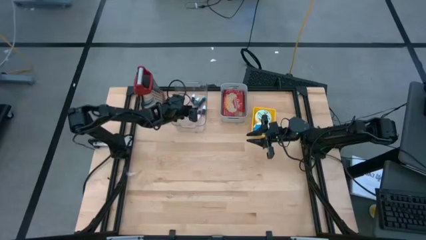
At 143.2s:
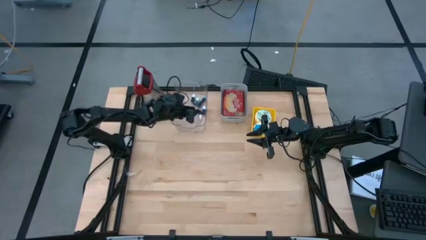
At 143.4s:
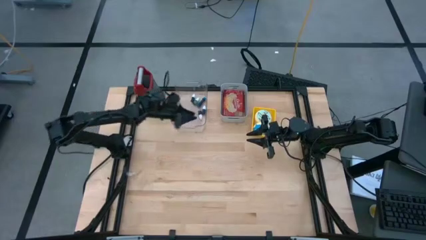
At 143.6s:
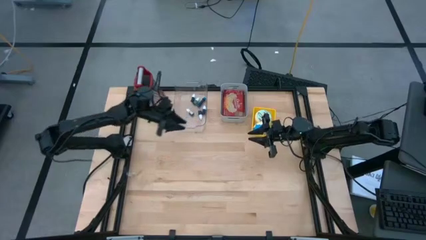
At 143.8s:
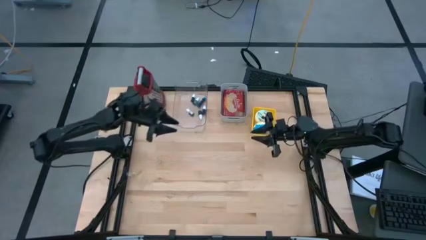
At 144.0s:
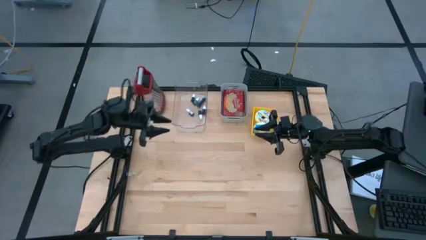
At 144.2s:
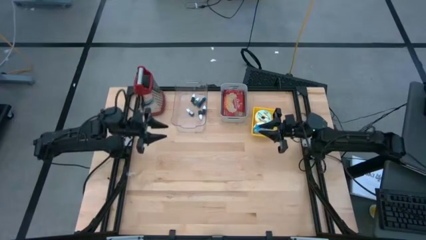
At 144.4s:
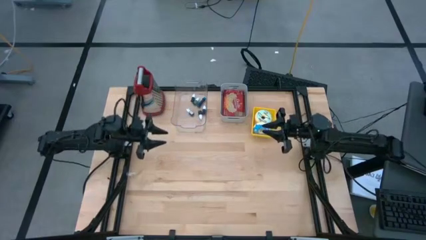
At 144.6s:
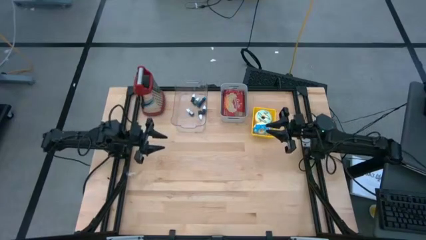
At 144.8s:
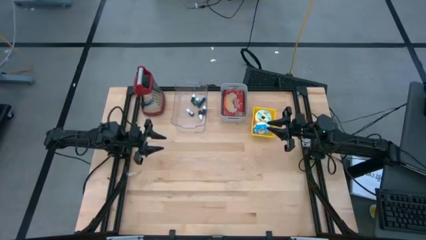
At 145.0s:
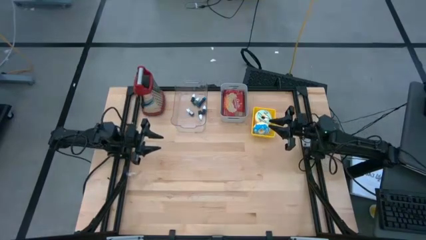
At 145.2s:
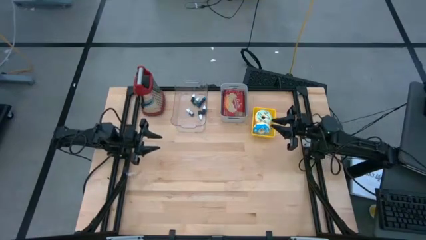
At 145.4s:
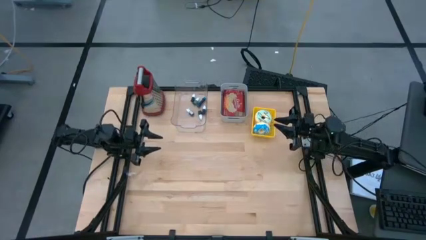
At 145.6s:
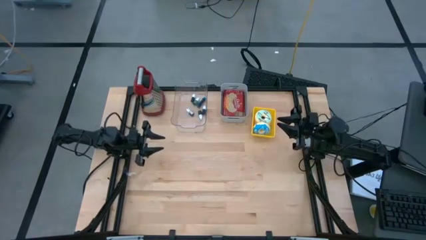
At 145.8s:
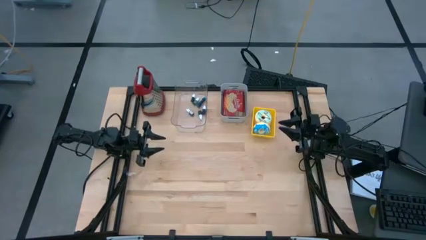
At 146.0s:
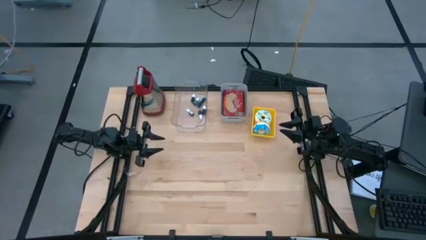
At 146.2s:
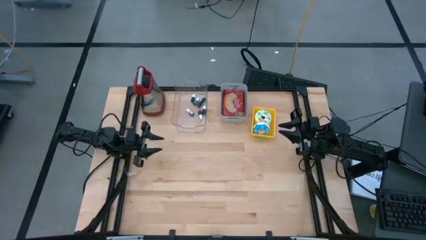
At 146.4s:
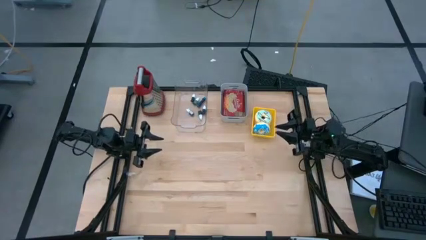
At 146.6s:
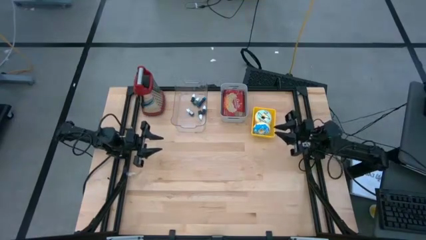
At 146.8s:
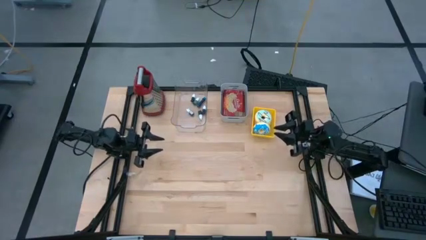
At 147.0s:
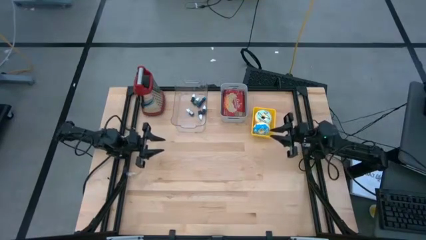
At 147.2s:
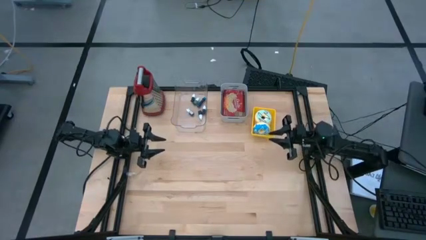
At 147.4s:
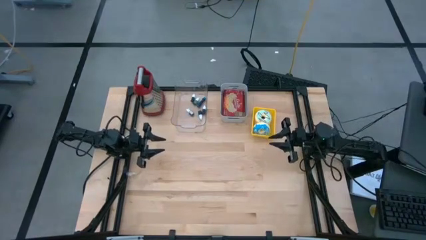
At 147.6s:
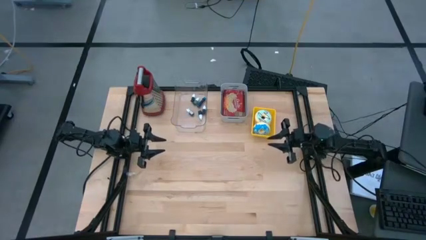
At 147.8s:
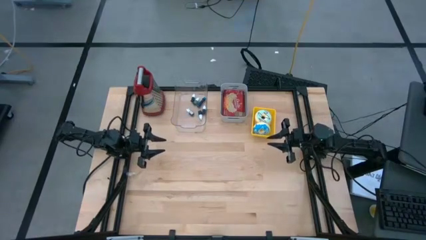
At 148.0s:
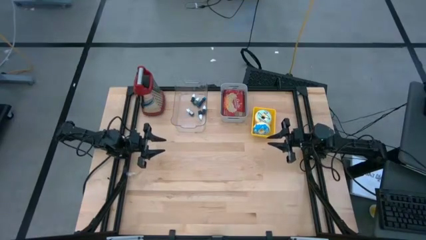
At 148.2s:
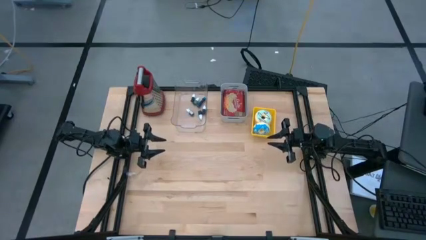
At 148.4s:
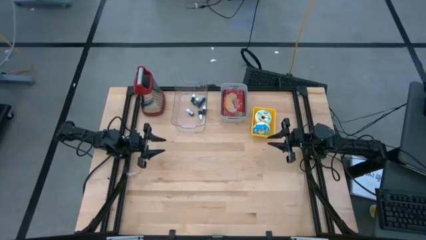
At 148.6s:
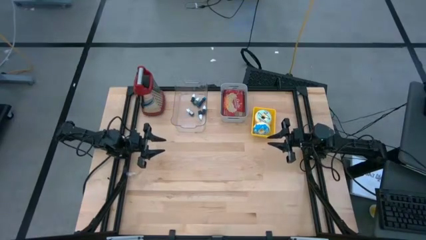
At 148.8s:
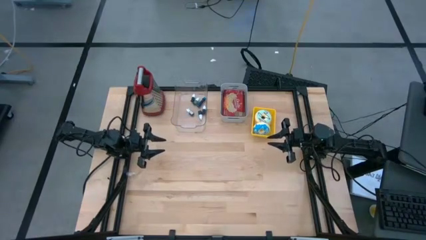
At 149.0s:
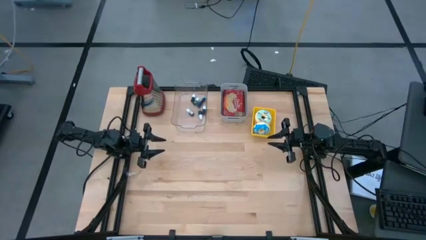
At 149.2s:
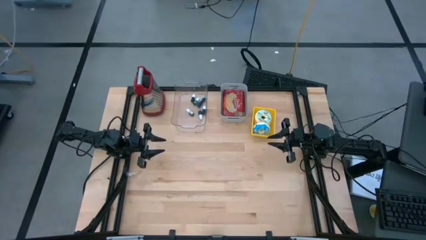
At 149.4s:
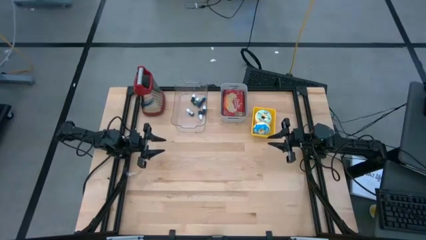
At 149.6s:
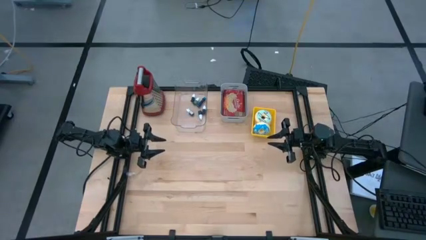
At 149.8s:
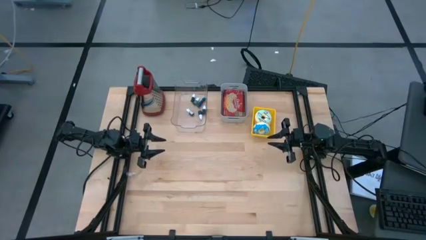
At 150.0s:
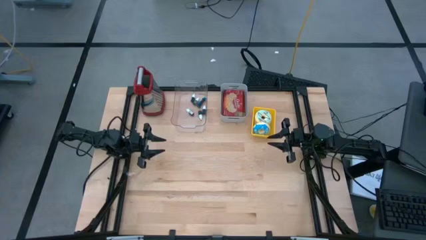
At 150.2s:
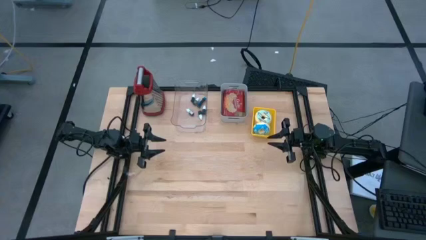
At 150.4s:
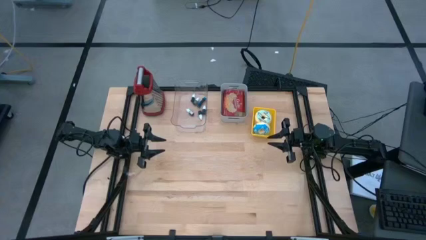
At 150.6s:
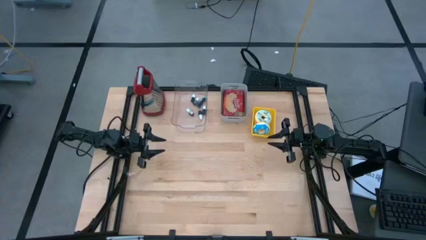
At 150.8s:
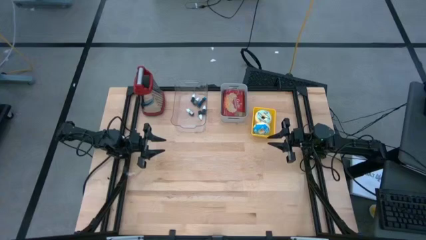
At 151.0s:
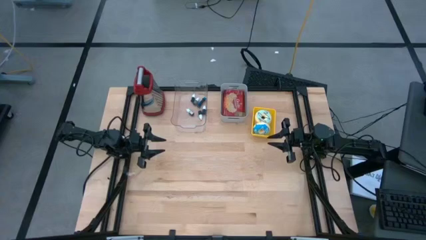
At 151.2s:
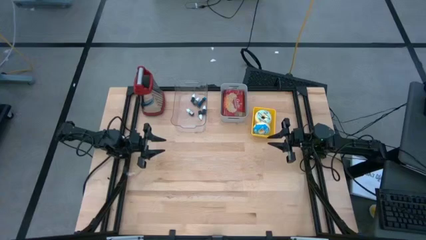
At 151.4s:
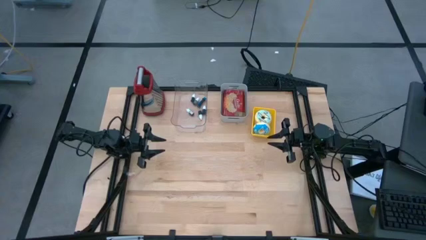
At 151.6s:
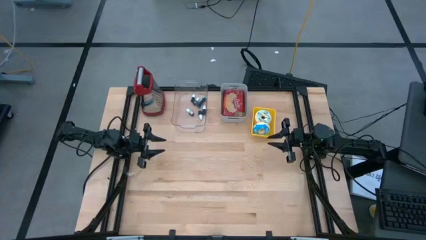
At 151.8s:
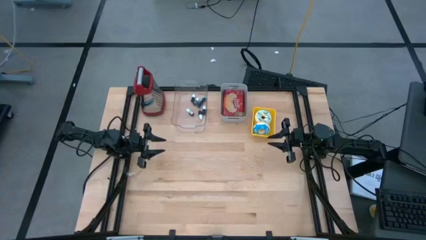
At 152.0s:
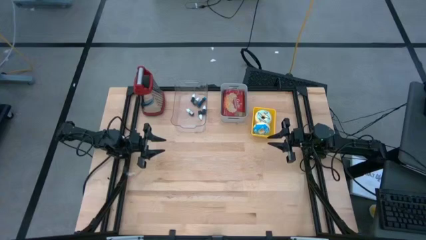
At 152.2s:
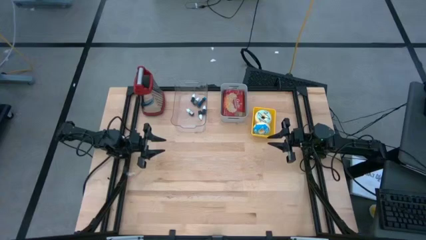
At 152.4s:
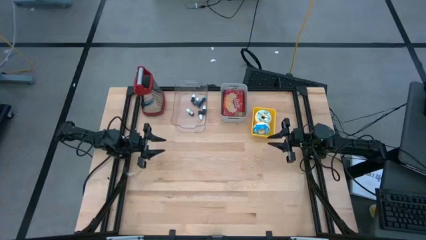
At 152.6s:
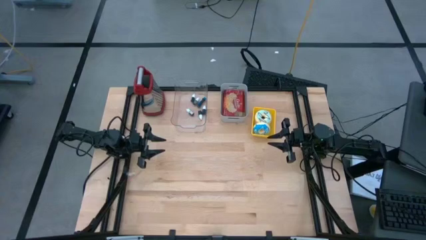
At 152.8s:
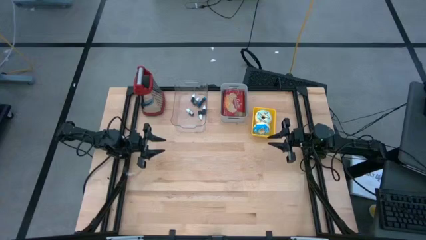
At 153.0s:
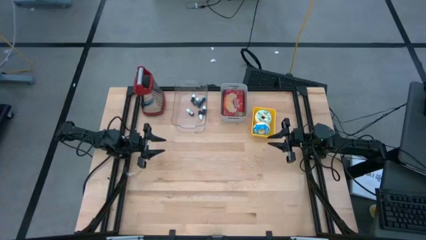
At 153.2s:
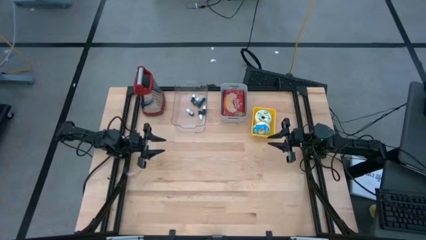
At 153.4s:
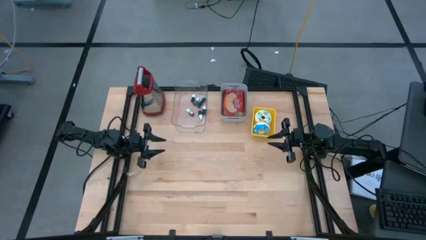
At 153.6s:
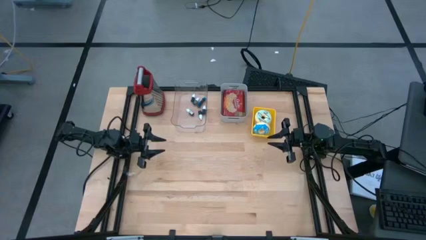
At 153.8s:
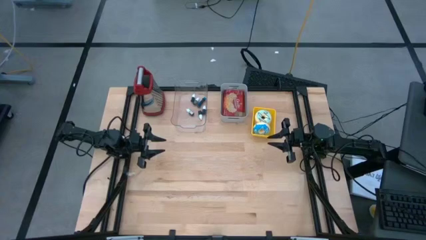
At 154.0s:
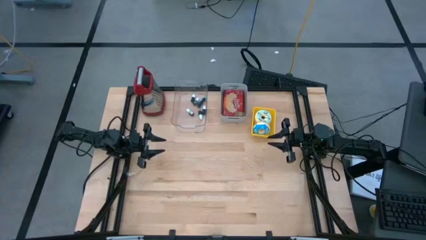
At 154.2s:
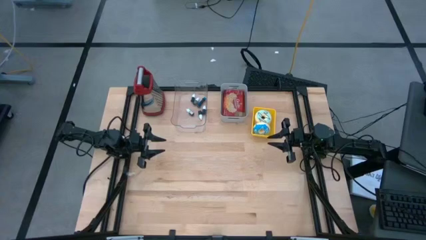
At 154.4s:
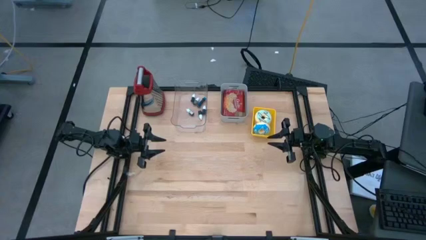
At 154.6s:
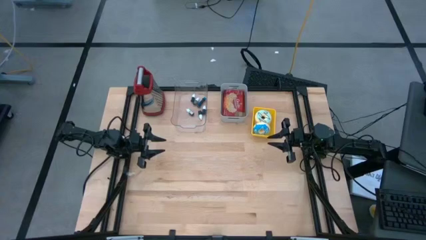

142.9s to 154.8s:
Task: Pick & Place Food Item
Return to Home Position

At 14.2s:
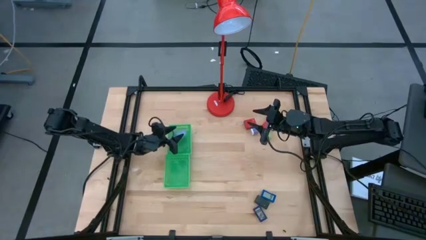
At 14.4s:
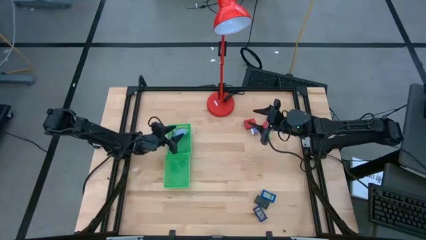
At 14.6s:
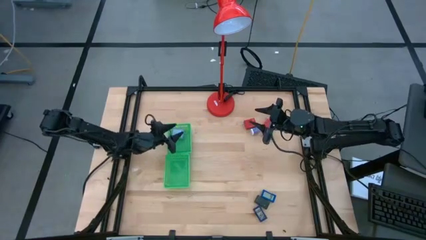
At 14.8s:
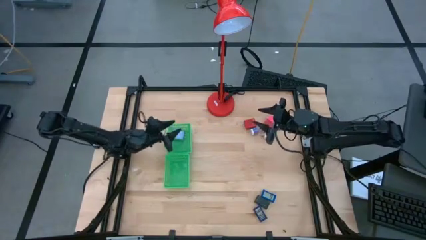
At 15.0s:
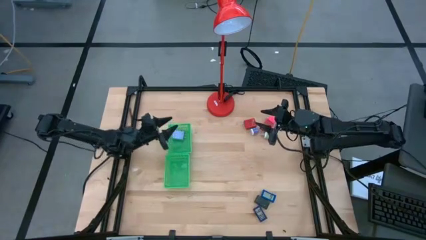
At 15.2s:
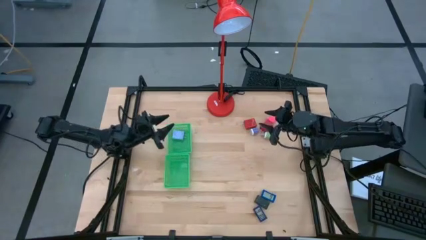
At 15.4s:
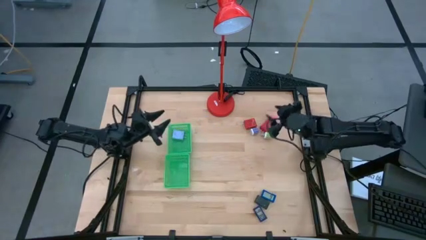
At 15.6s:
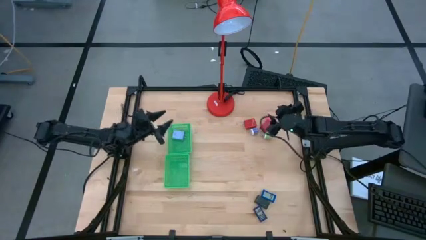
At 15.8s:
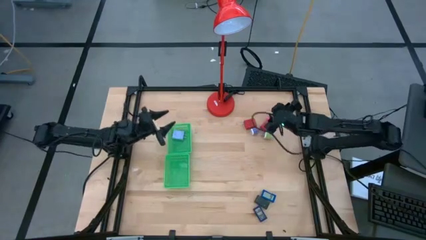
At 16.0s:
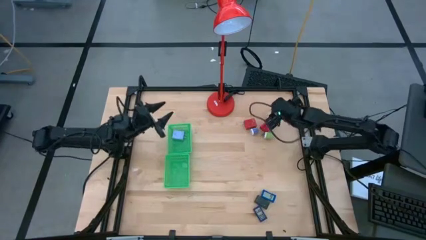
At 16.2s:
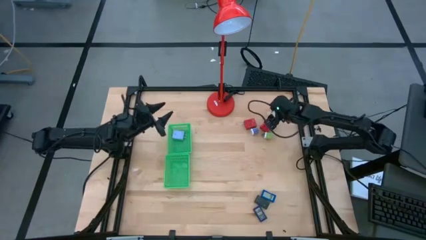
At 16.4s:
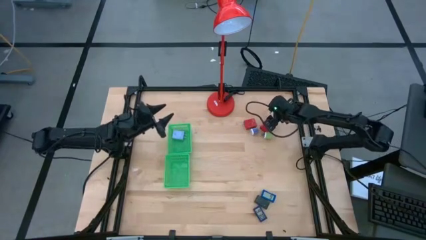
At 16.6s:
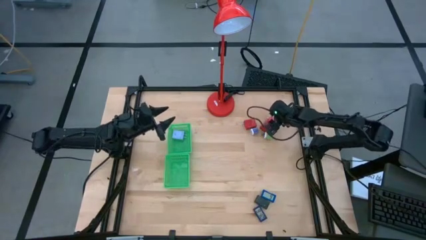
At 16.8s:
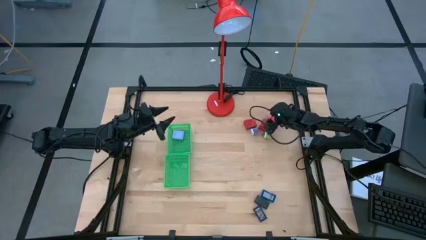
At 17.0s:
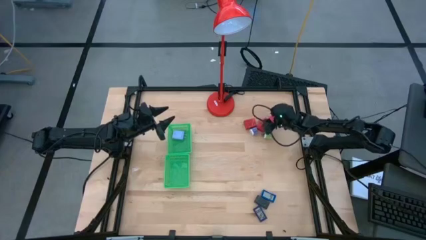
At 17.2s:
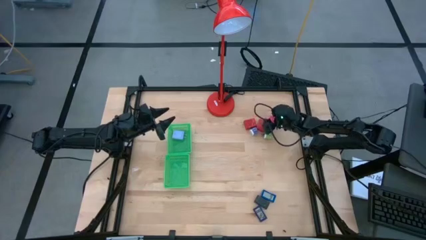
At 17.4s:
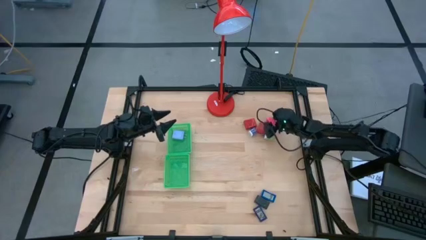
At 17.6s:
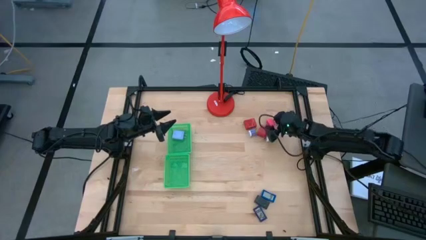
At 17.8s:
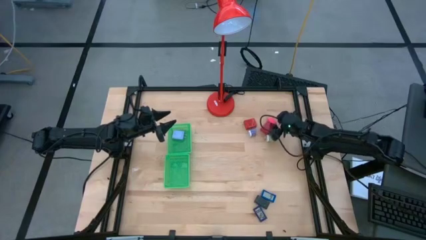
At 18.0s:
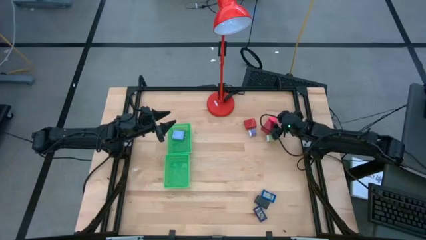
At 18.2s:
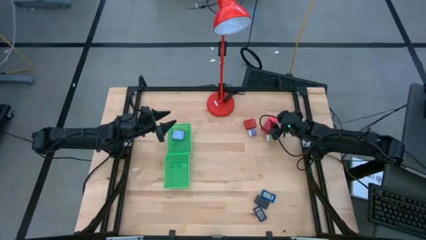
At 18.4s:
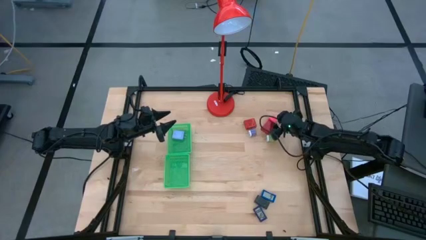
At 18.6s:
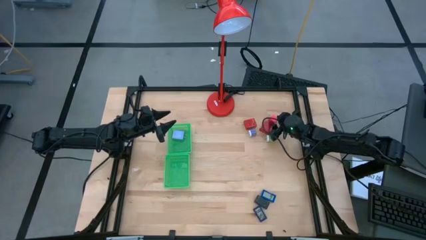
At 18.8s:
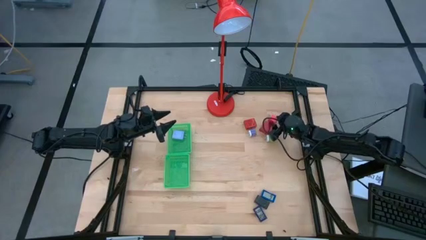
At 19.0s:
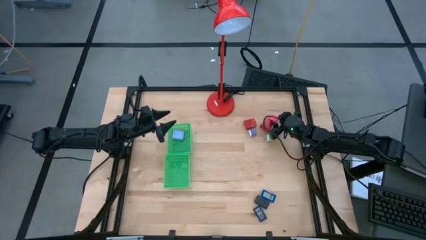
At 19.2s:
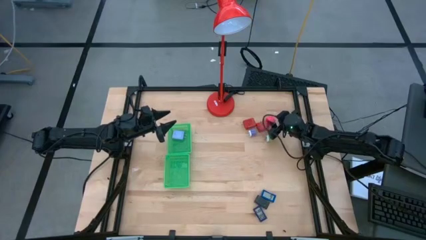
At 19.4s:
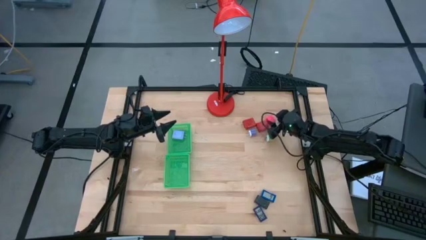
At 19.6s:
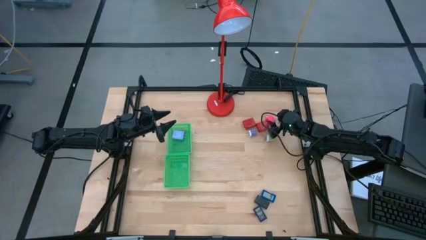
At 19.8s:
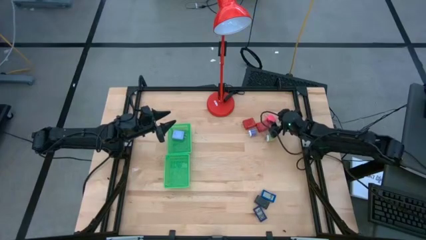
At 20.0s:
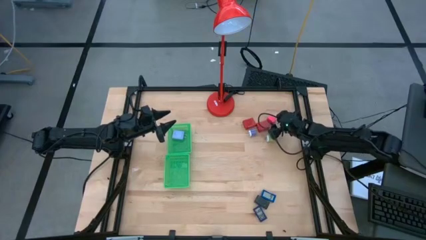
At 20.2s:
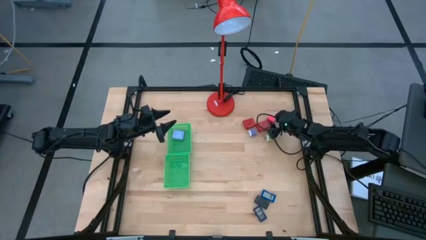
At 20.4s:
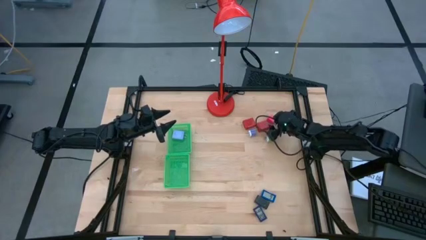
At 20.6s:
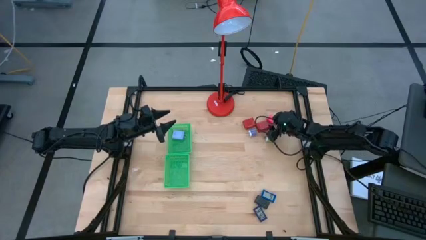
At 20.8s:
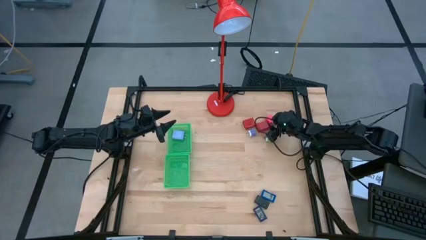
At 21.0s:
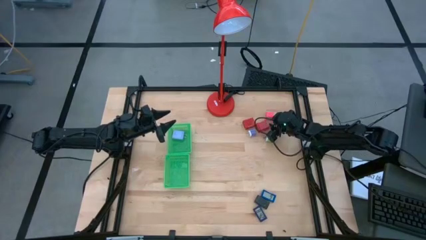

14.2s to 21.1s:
Task: Pick & Place Office items
Put the pink charger adapter into the top green bin
